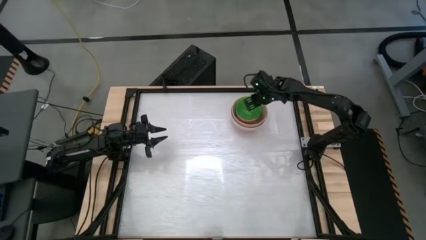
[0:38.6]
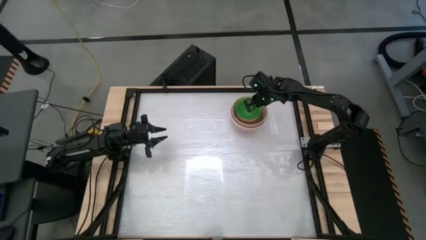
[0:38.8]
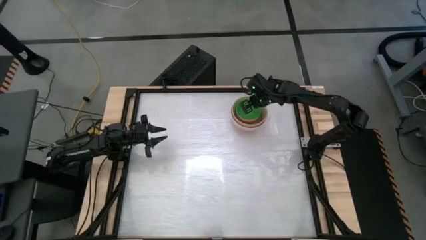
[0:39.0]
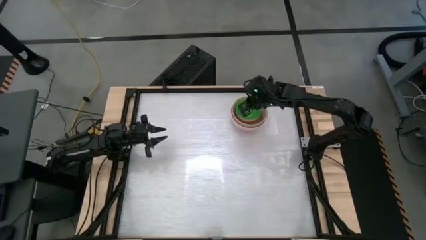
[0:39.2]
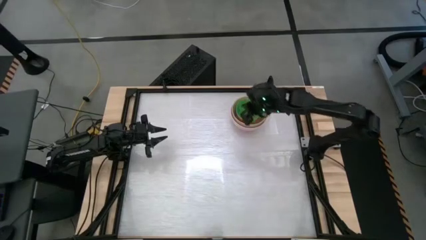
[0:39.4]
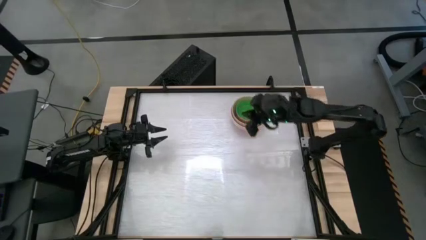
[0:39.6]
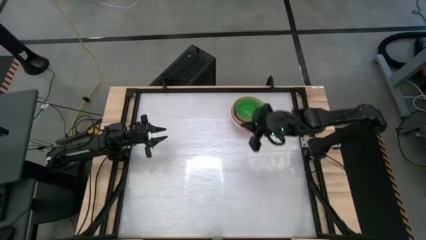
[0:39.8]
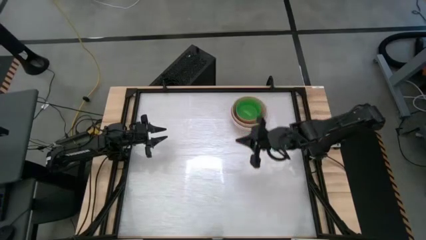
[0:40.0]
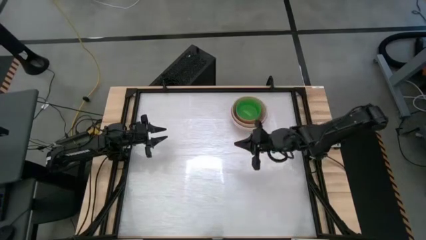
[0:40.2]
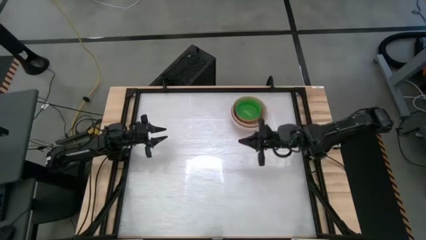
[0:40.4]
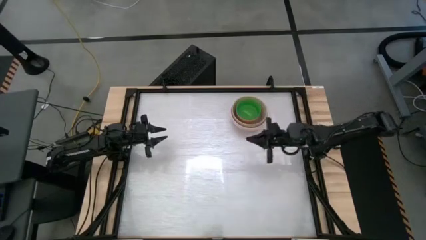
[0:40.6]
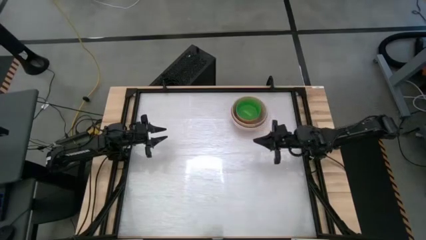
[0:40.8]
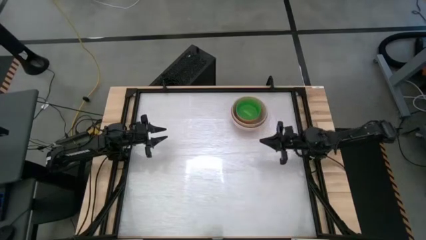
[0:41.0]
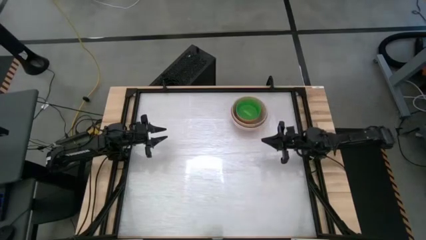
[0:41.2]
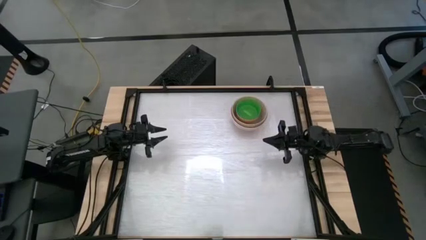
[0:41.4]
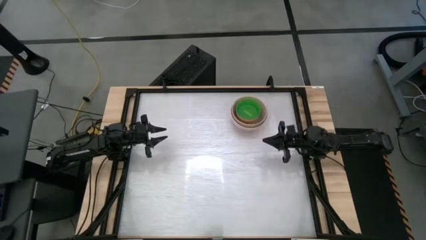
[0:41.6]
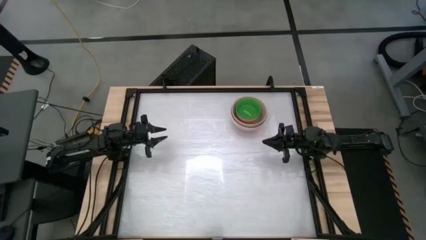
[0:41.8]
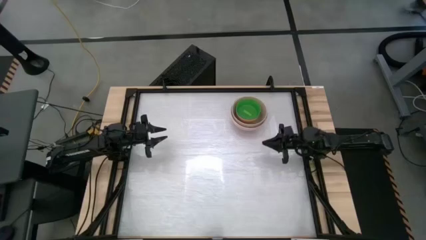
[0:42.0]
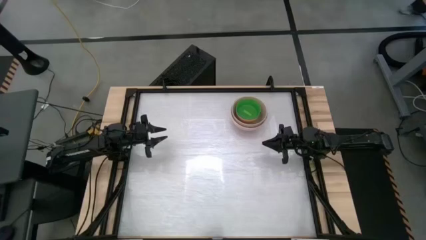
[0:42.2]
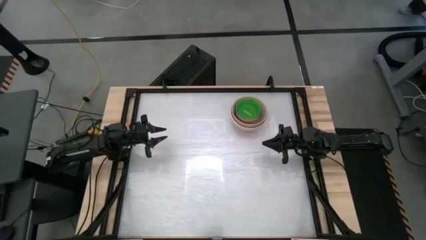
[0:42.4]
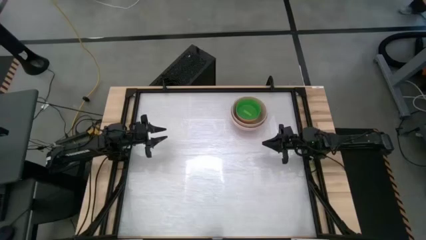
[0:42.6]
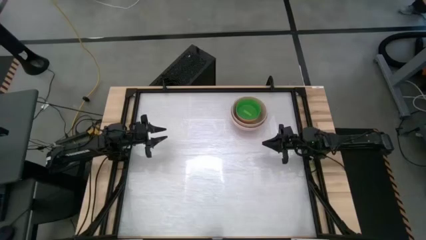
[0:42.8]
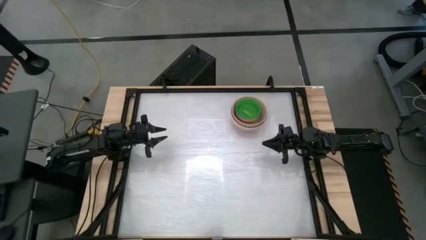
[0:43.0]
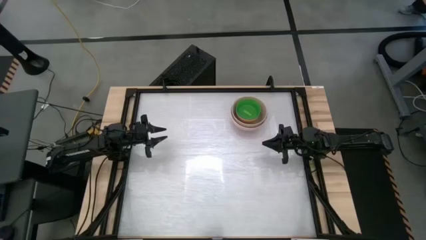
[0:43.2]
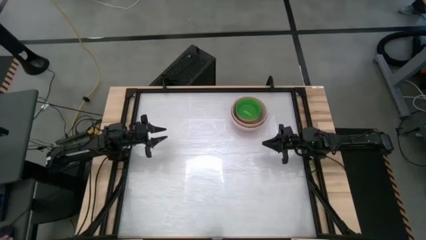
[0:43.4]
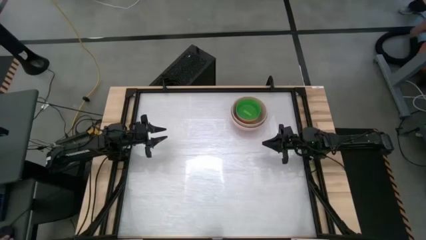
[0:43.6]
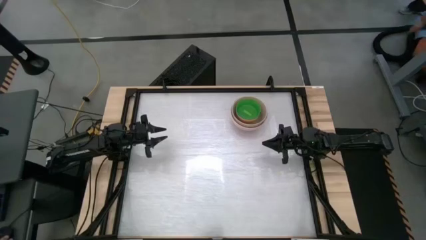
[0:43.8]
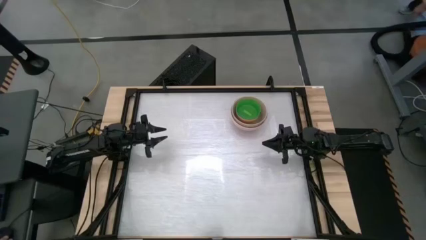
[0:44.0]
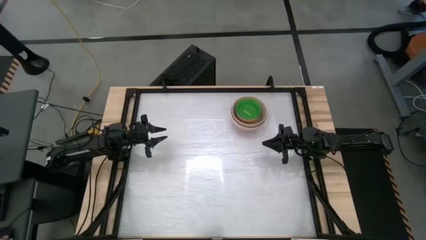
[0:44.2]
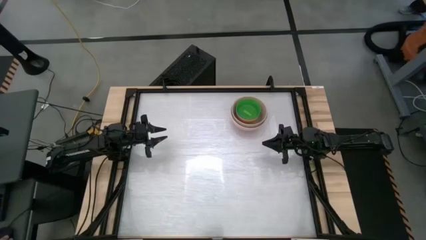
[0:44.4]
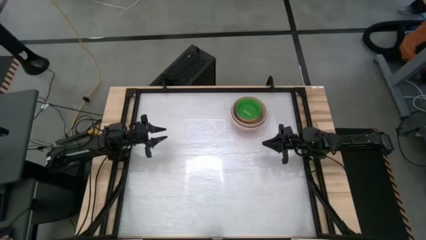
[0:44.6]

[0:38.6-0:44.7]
Return to Home Position

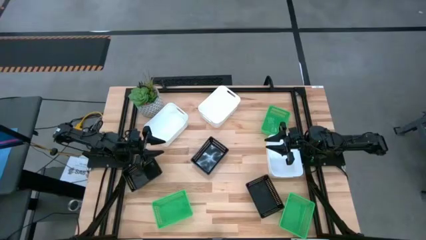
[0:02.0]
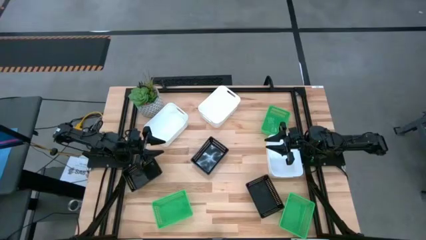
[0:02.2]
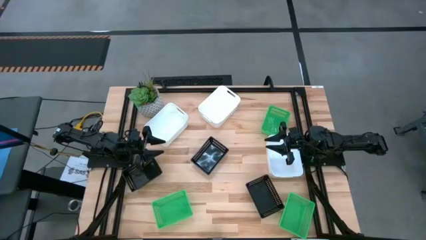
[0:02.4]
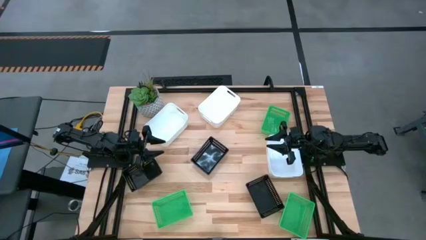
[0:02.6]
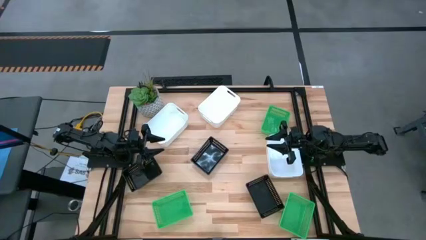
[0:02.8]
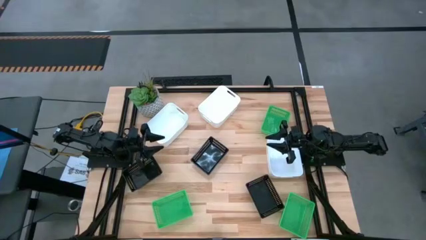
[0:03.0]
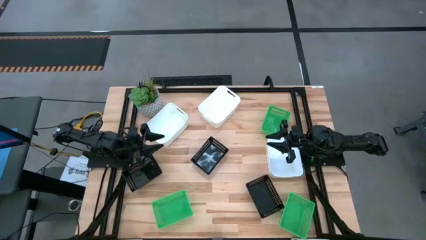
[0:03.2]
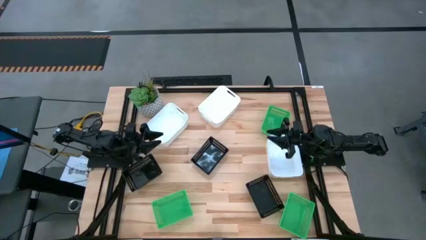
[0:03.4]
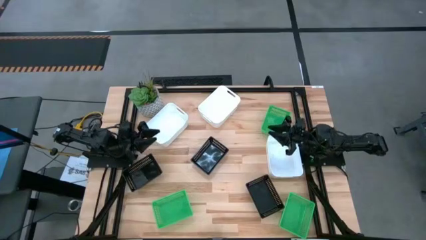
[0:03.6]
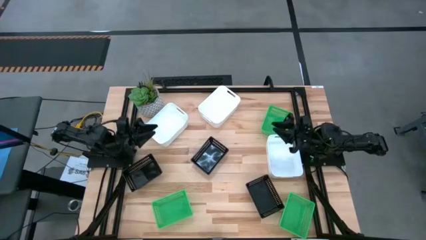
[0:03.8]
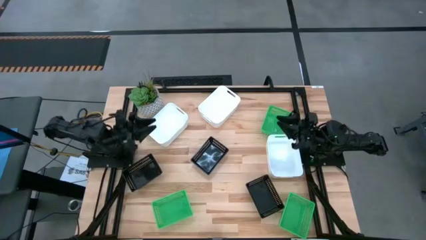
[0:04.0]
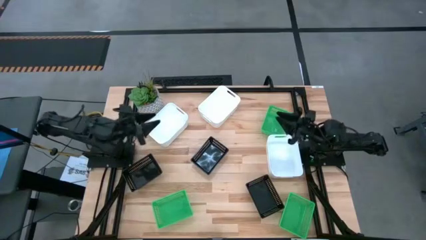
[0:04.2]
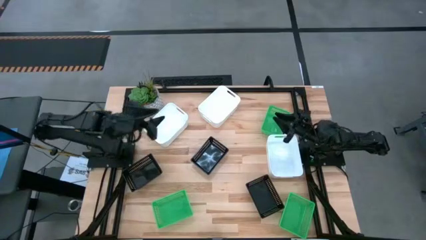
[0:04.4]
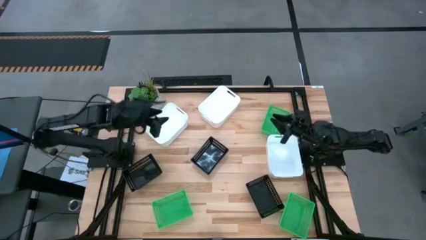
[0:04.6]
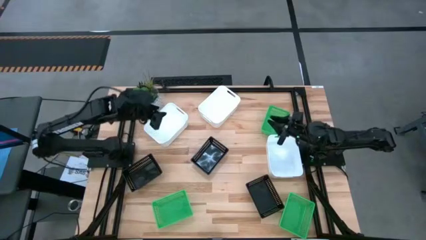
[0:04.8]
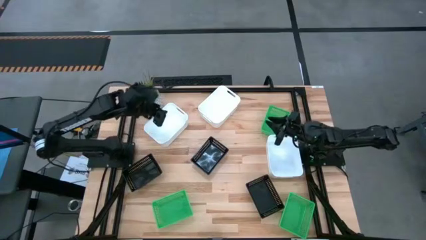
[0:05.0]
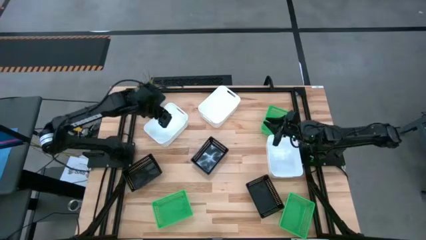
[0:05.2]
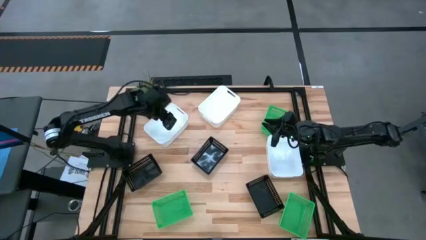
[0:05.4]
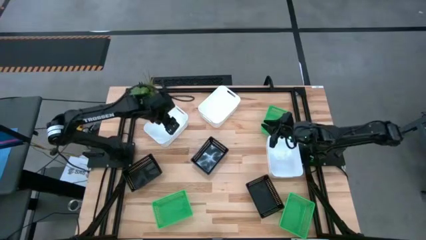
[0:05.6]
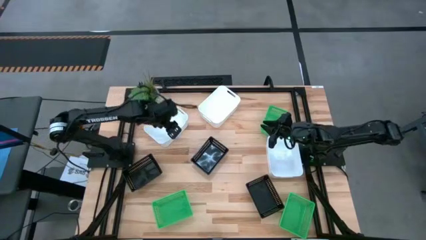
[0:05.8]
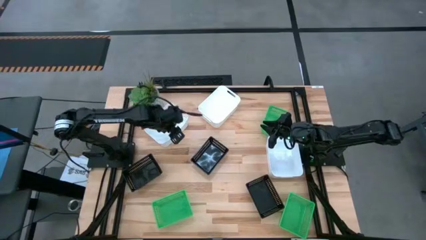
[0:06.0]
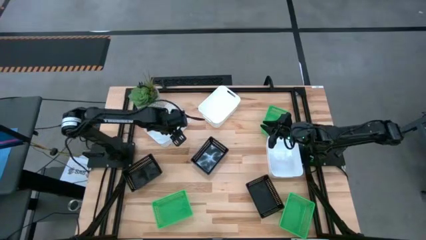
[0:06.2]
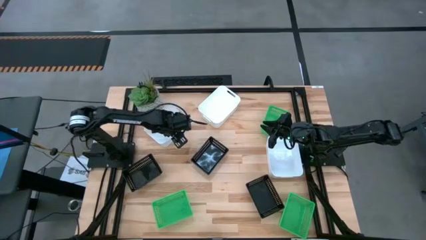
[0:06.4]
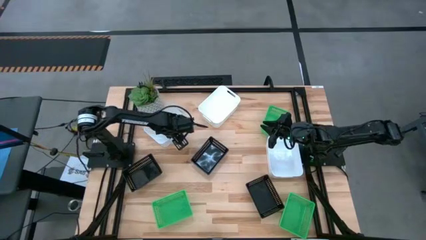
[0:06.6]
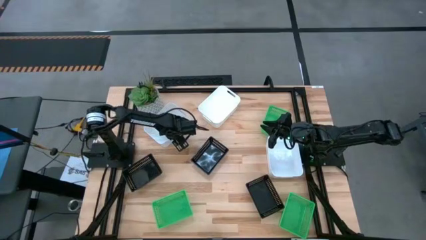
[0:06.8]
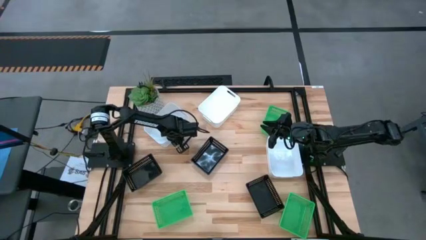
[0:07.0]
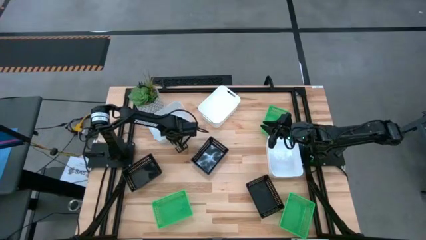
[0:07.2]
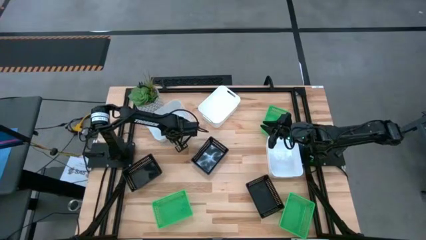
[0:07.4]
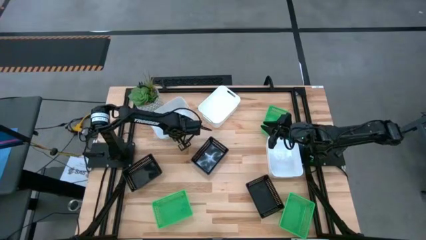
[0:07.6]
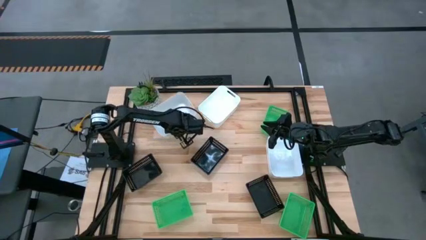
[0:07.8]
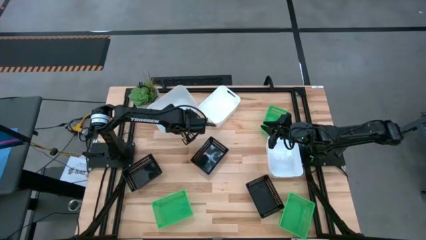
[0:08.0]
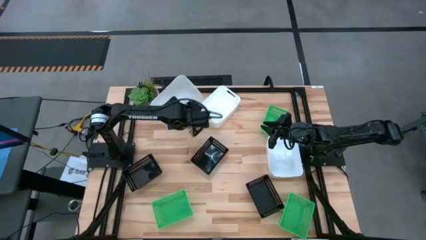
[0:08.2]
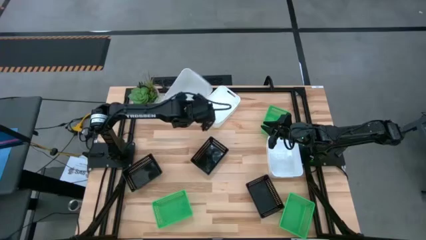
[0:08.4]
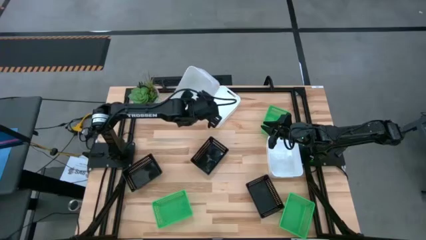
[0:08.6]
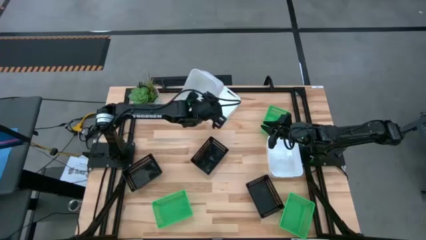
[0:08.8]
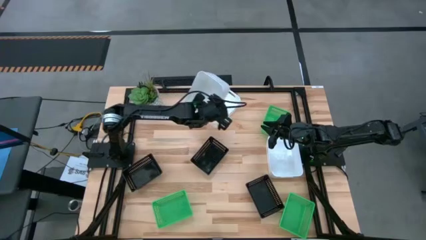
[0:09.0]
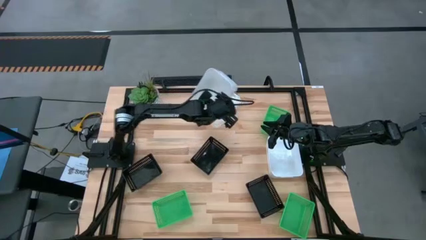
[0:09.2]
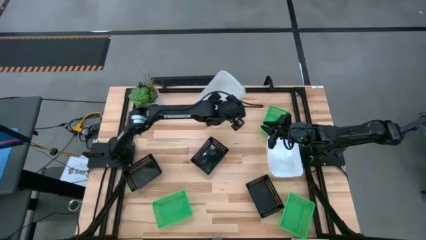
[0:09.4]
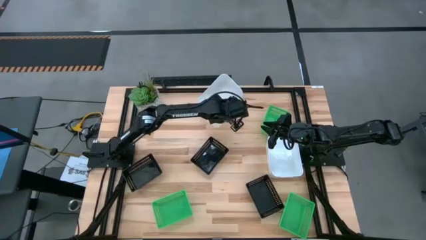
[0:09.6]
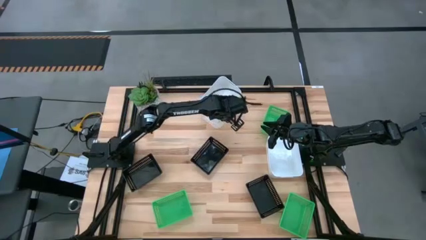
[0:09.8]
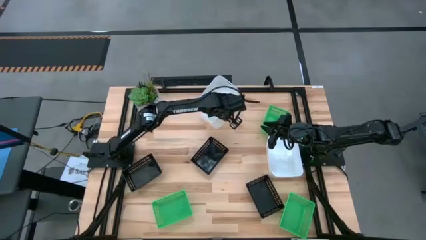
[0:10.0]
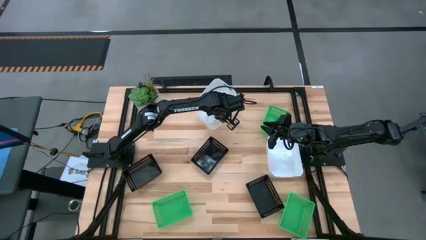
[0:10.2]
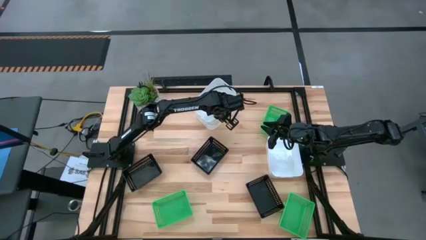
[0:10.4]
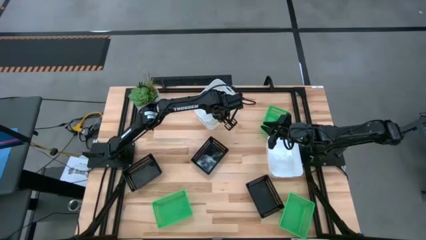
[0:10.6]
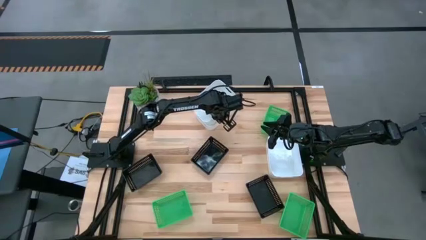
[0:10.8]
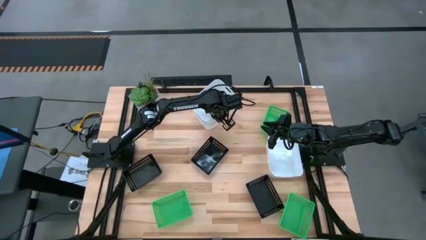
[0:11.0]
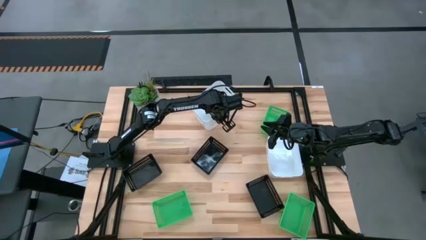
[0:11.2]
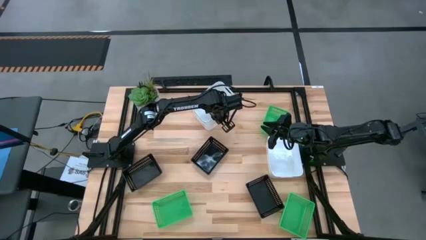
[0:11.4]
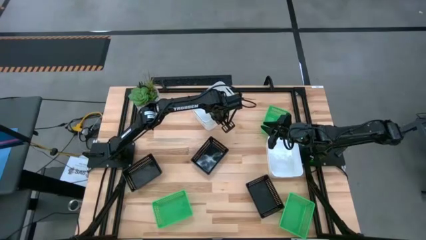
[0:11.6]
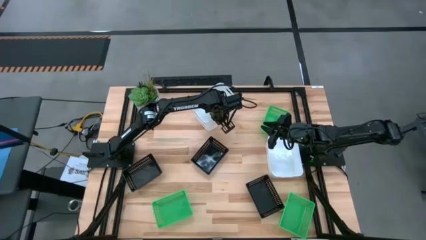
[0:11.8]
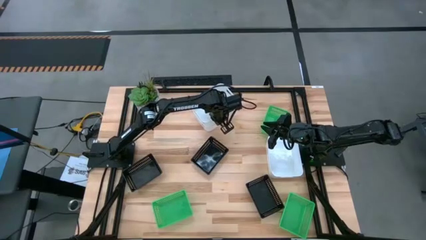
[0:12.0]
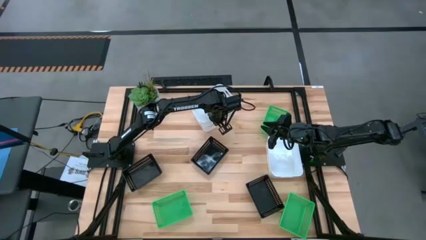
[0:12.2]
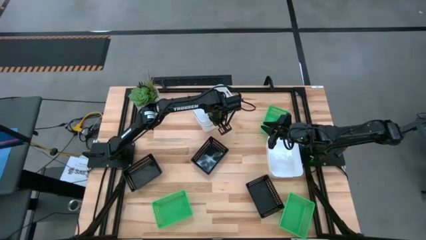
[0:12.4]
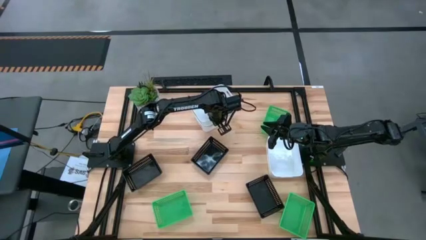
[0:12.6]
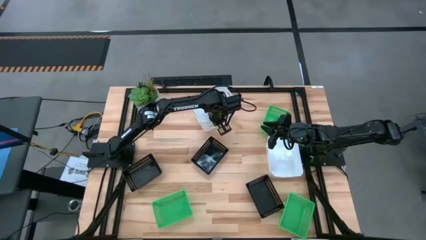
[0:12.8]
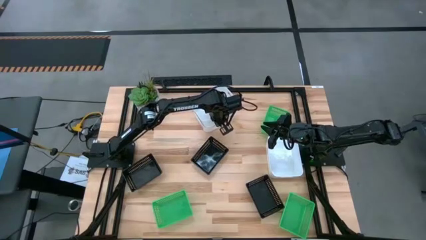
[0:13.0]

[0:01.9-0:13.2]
Stack the left white bin on top of the top white bin
